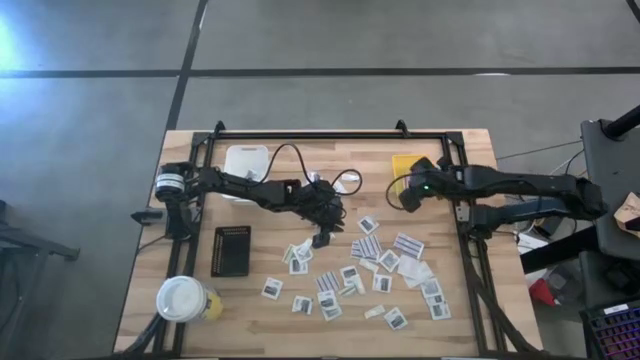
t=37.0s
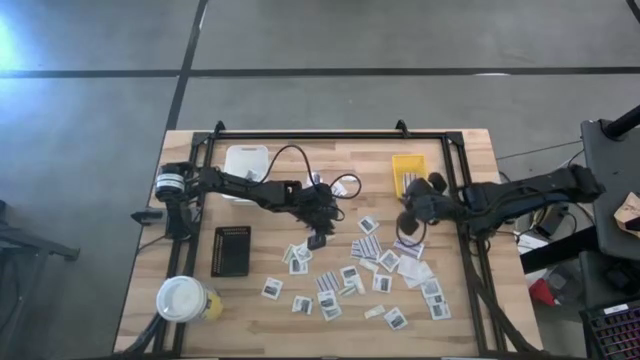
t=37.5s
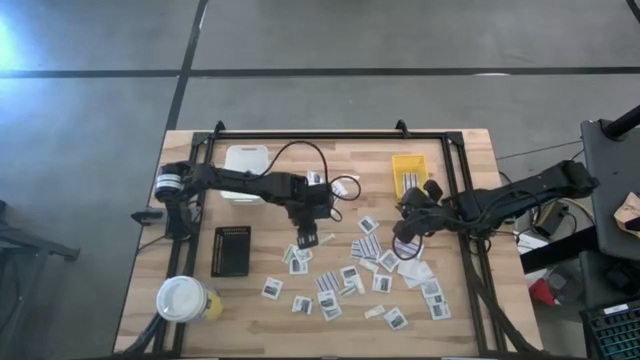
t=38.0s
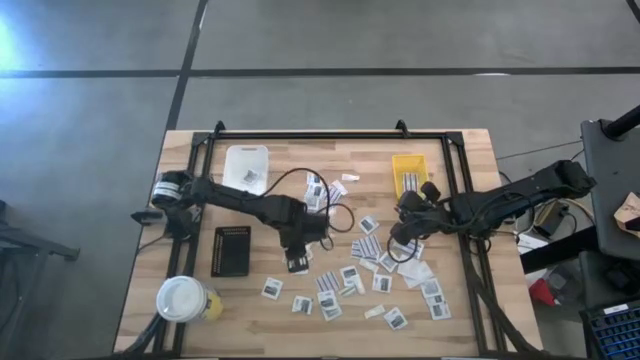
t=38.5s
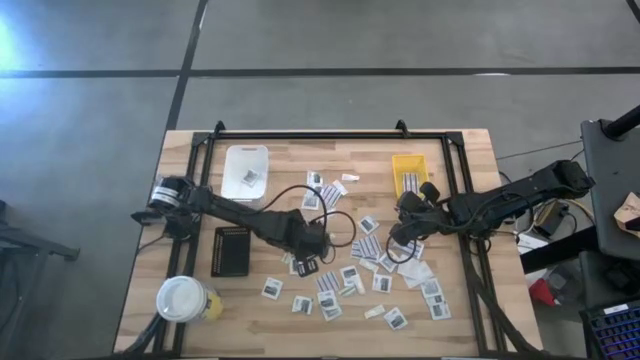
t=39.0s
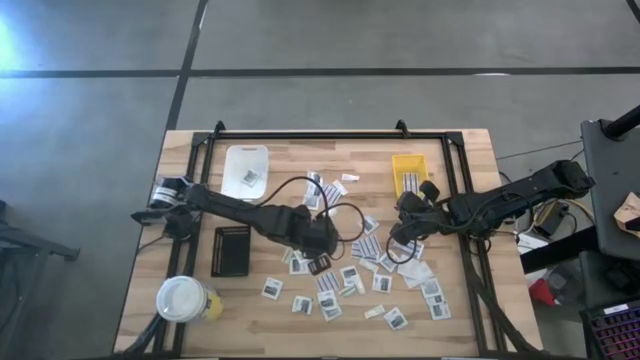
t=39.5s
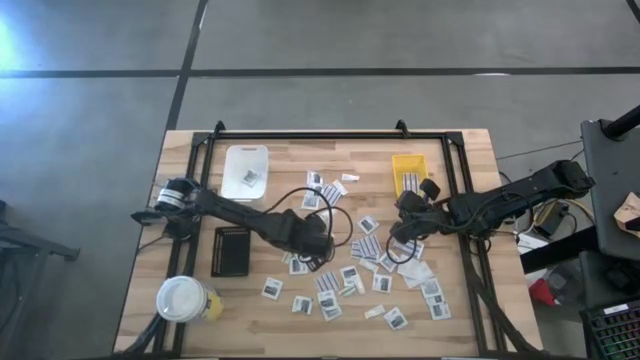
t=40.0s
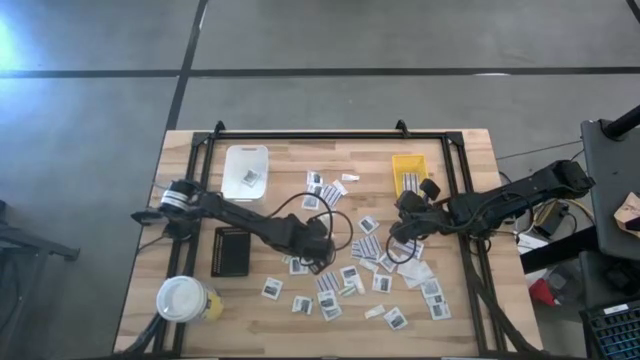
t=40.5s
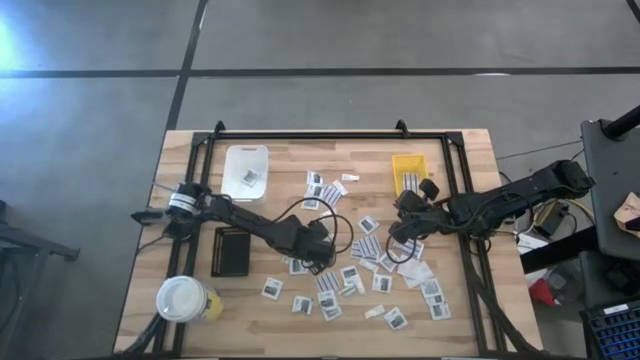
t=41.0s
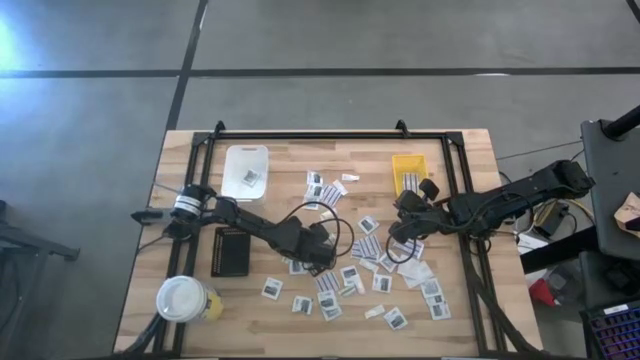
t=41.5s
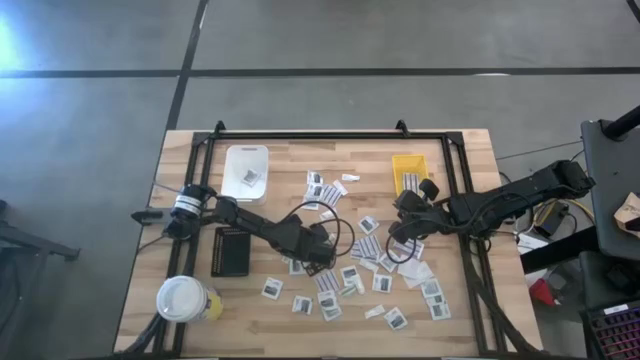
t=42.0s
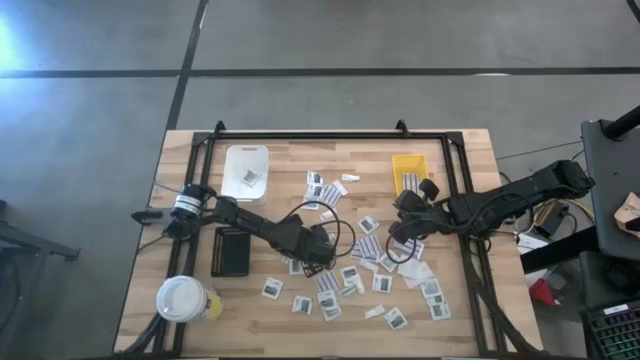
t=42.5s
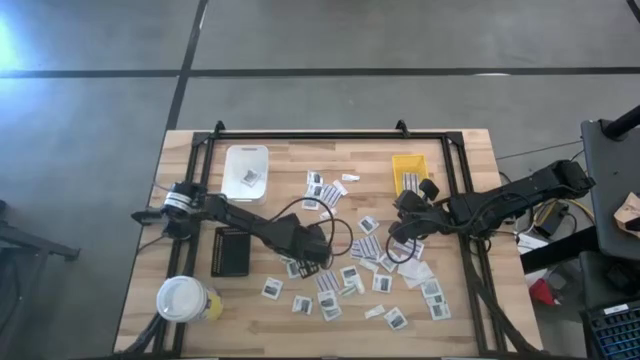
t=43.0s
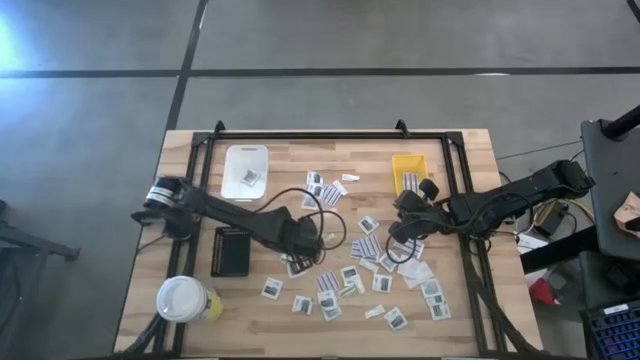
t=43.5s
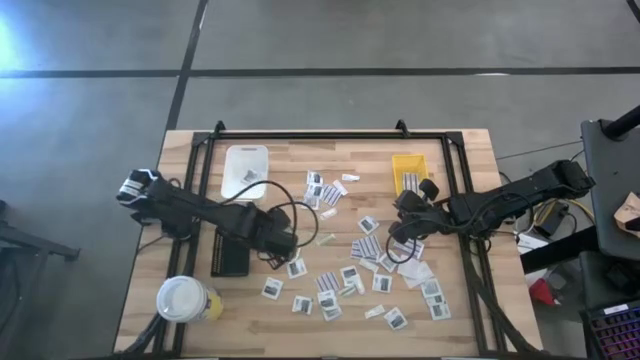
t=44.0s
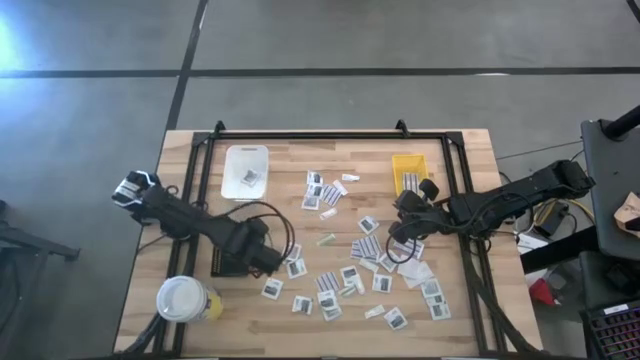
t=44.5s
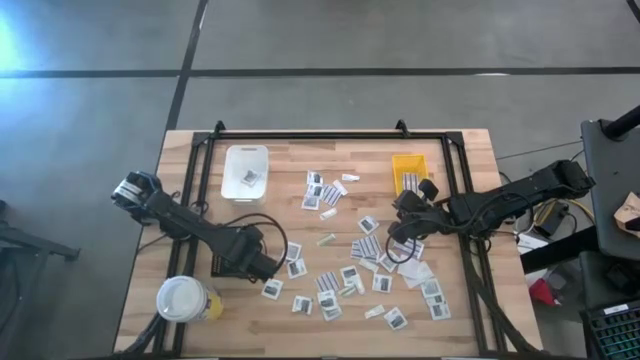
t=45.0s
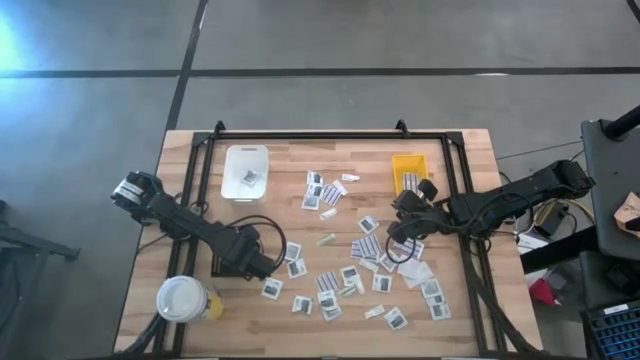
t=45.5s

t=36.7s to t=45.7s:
Task: Pick & Place First Aid Supplies
Put the green bandage pack into the black bin

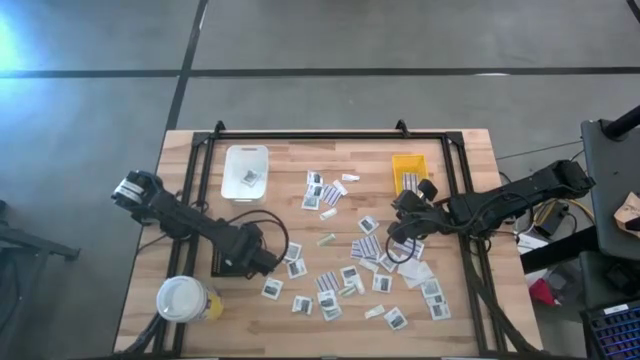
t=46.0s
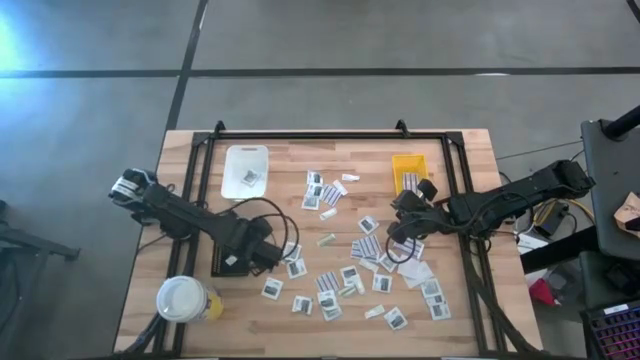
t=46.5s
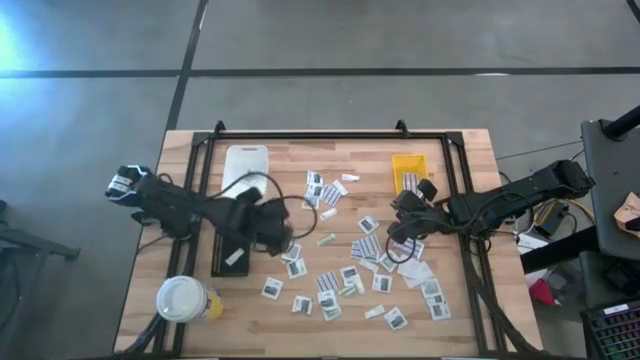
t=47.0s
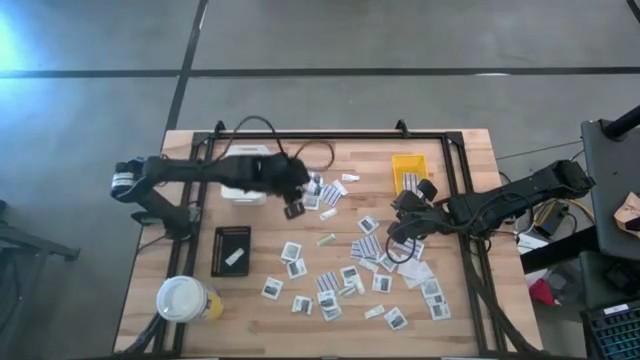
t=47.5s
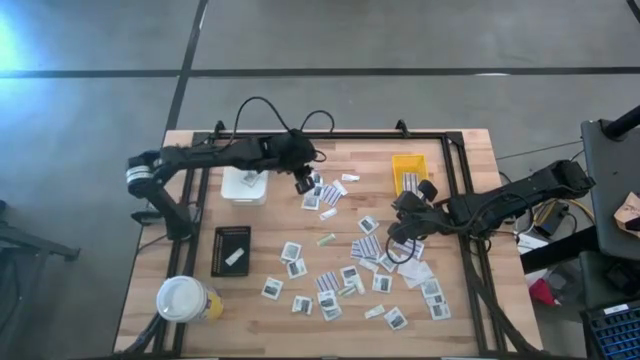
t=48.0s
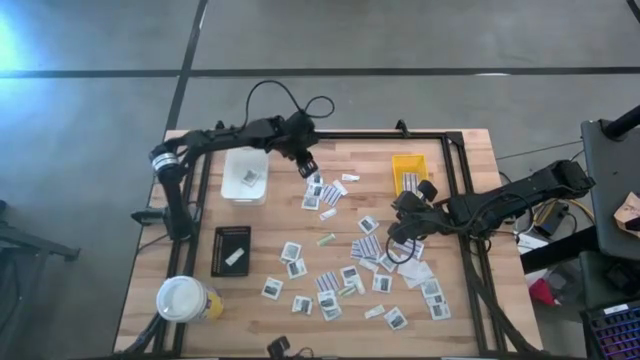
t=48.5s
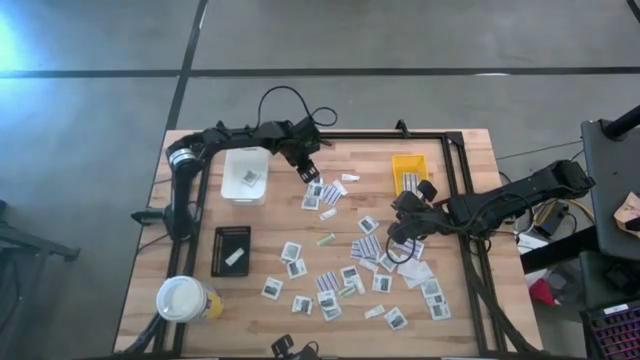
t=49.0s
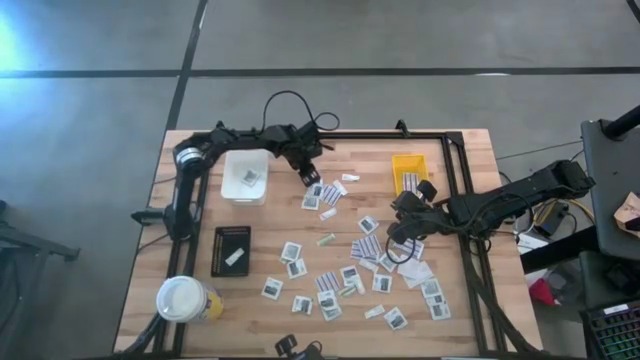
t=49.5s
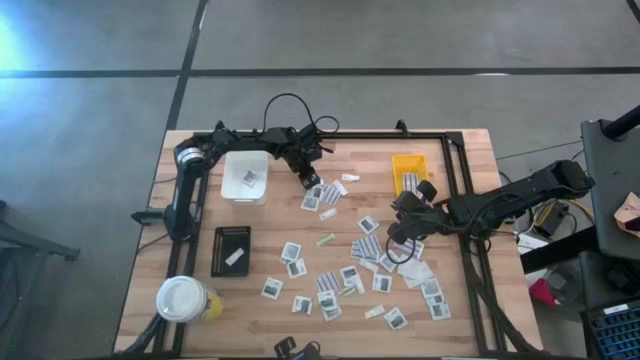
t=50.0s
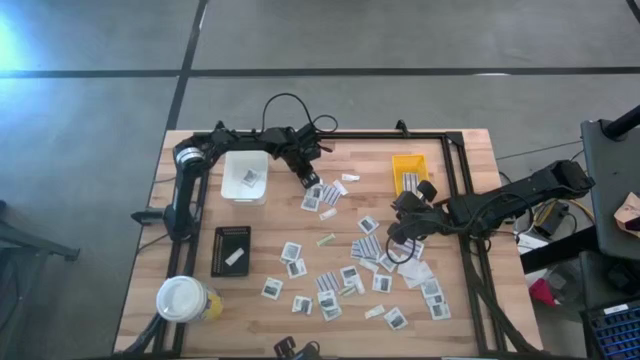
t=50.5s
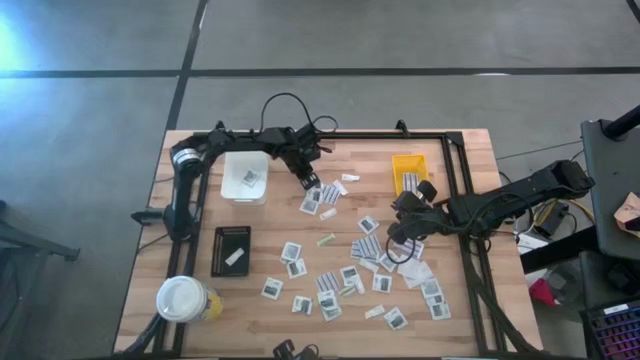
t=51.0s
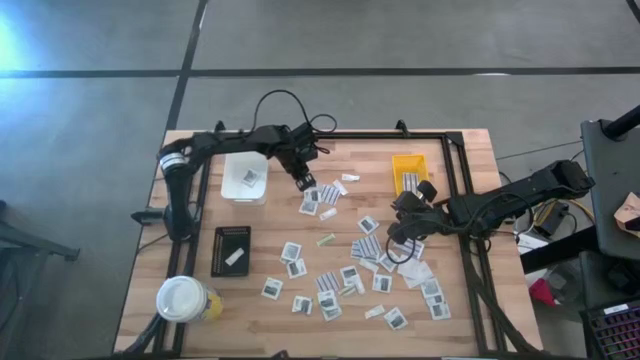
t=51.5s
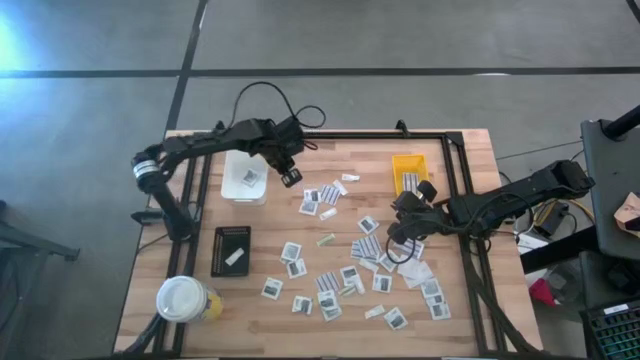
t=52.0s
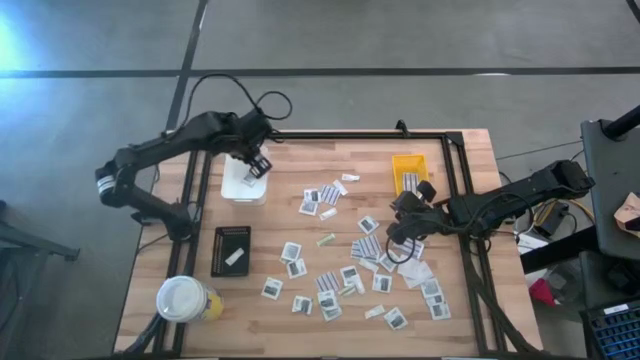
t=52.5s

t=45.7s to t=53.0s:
Put the gray towelette pack into the white bin

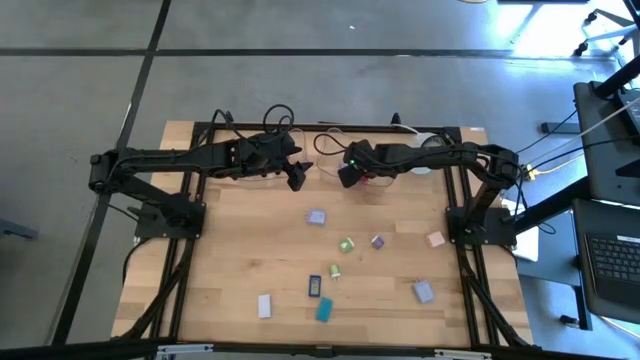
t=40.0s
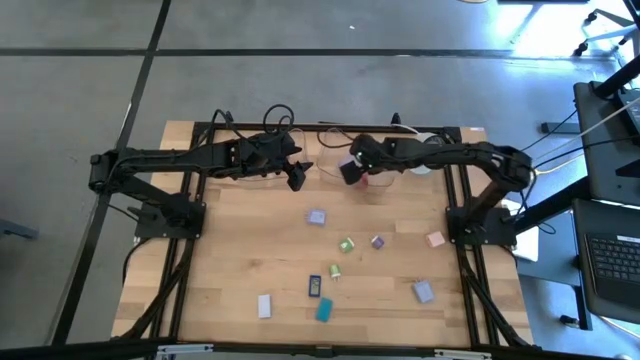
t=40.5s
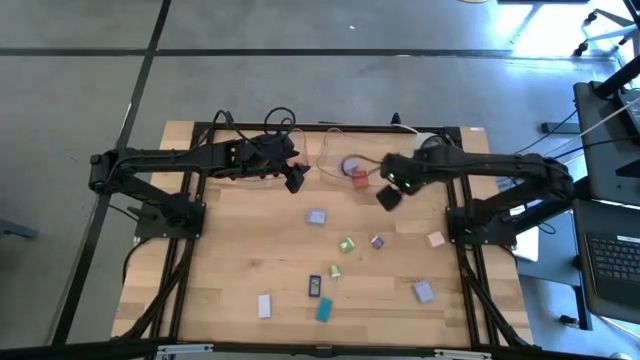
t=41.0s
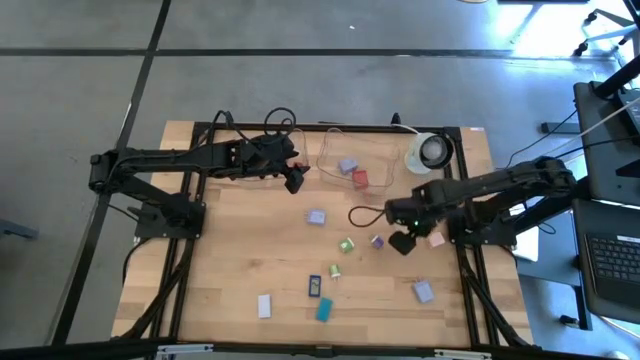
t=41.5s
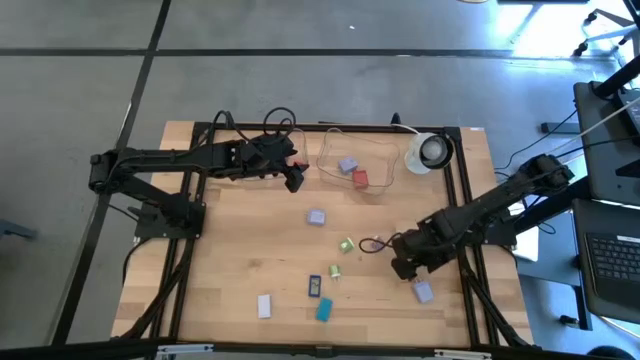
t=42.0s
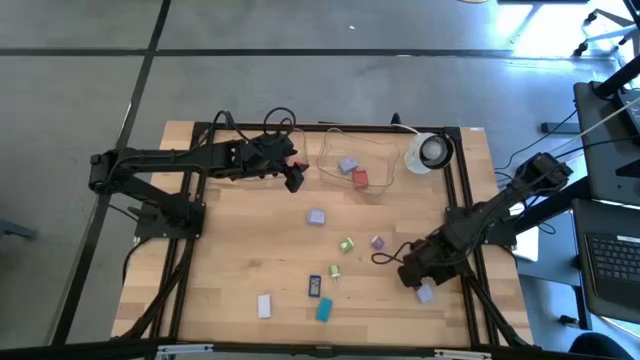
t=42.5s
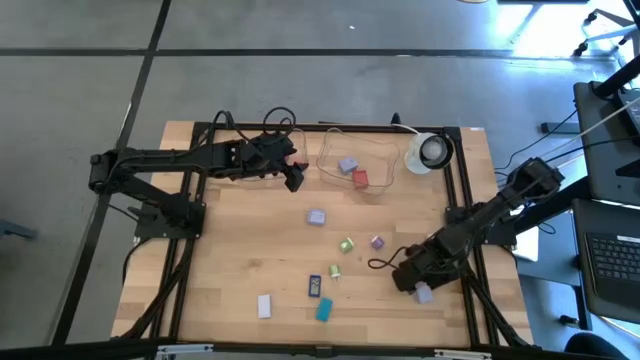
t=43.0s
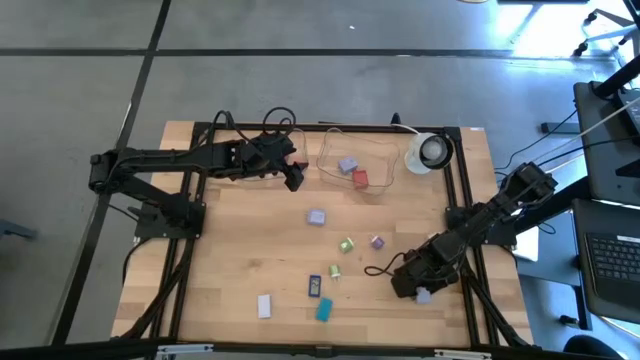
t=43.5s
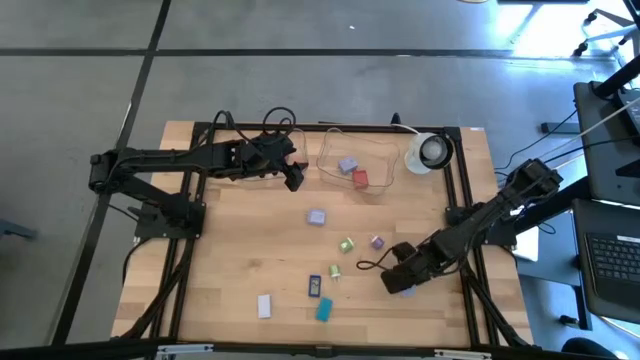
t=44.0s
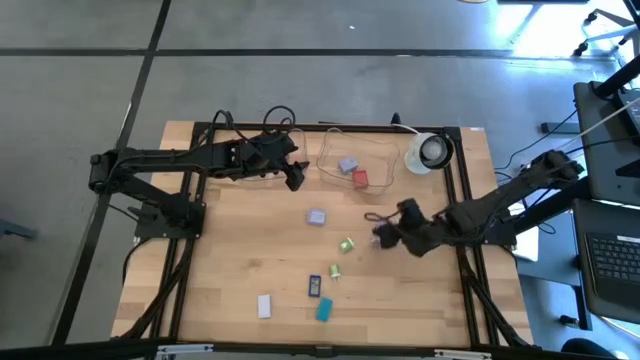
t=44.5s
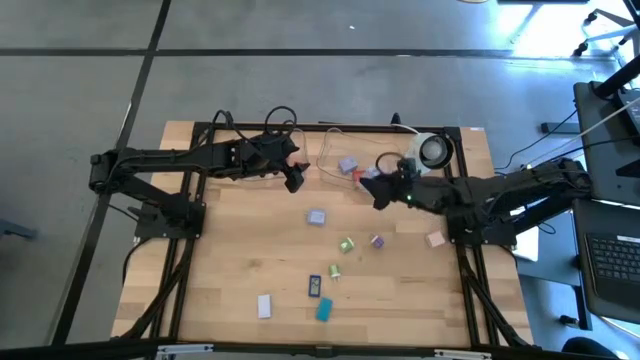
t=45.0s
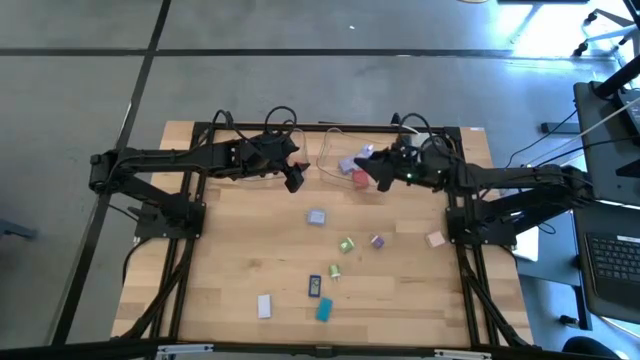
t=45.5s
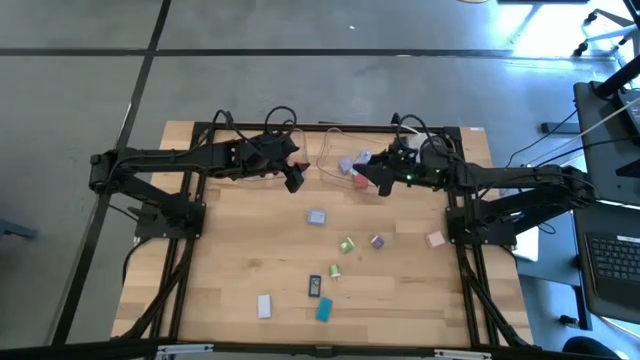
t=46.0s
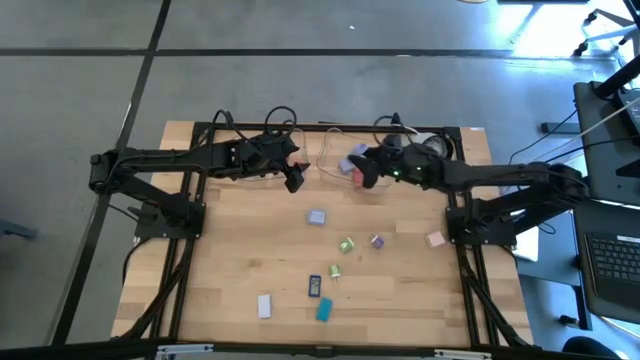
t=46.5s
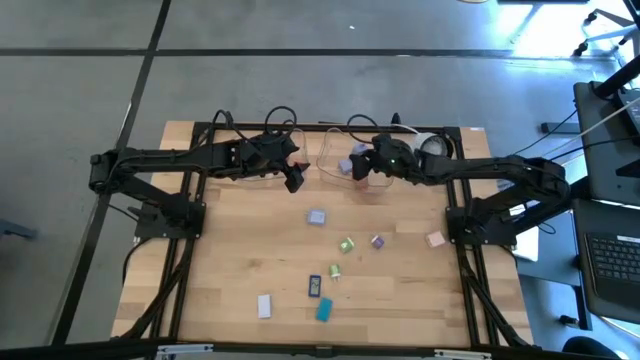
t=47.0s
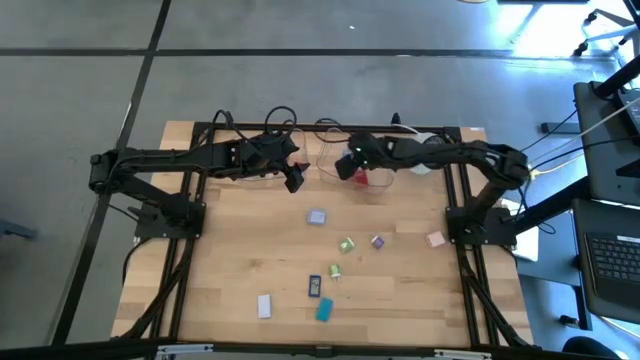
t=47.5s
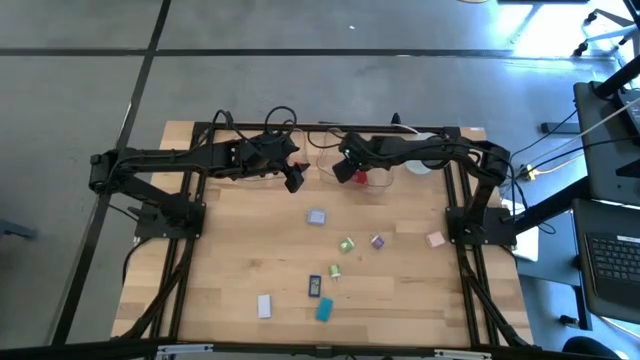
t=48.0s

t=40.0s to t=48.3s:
Task: Pick & Place Office items
Put the bottom purple charger adapter into the right transparent bin
